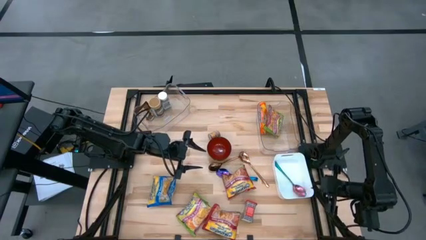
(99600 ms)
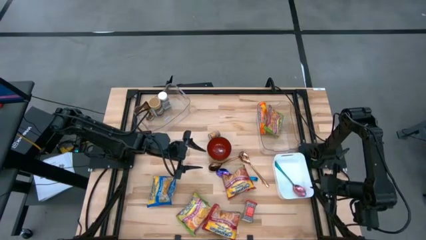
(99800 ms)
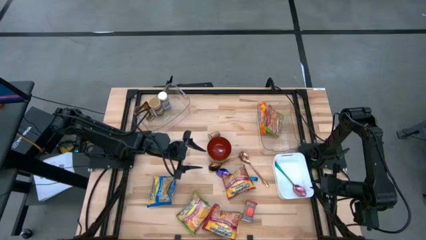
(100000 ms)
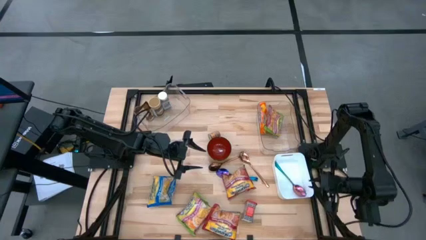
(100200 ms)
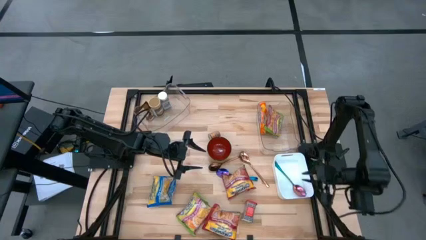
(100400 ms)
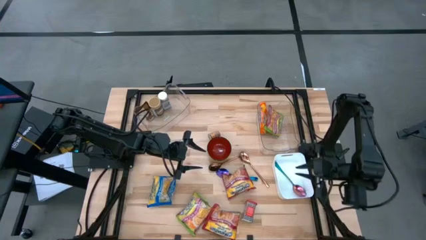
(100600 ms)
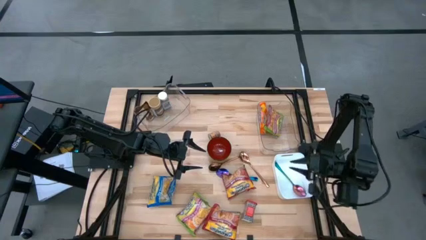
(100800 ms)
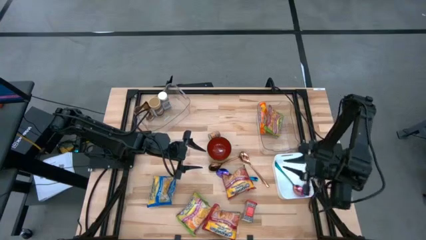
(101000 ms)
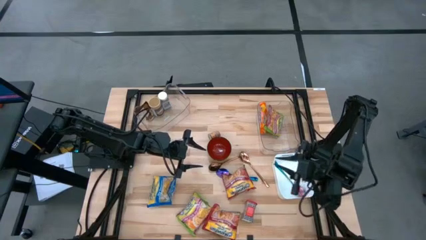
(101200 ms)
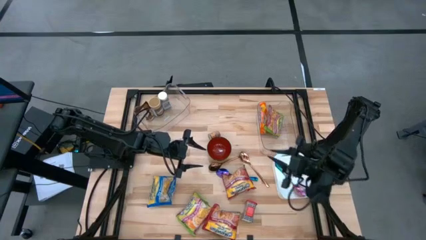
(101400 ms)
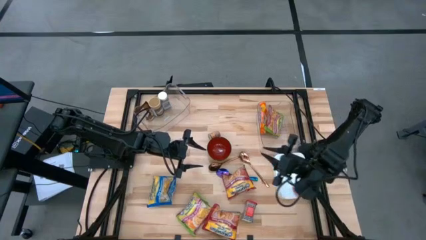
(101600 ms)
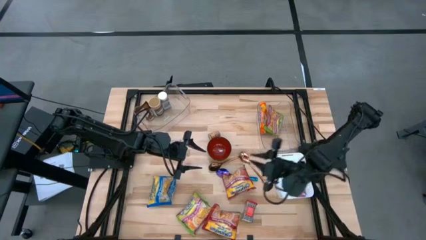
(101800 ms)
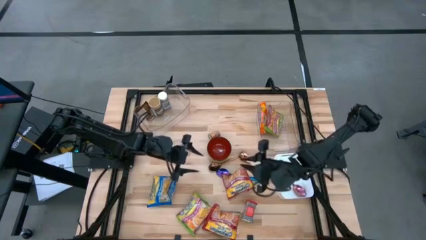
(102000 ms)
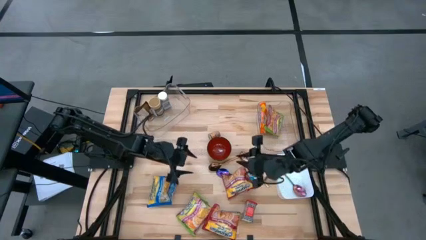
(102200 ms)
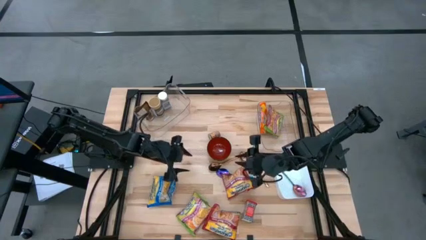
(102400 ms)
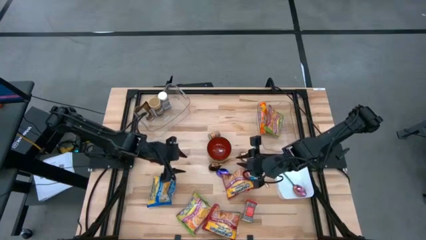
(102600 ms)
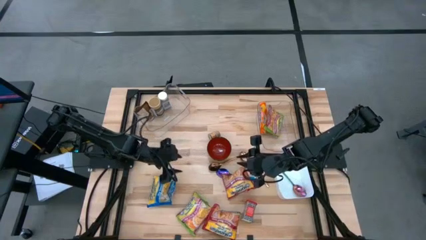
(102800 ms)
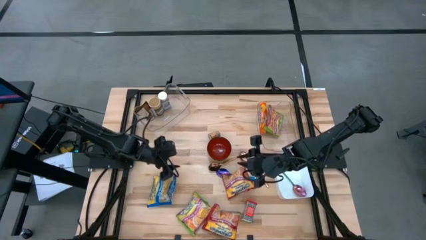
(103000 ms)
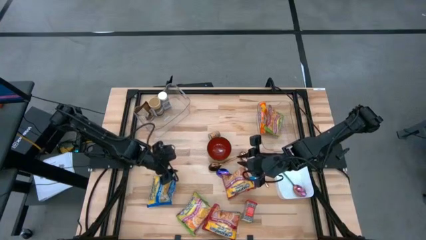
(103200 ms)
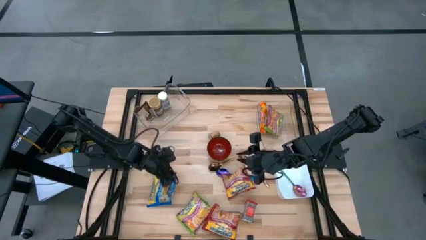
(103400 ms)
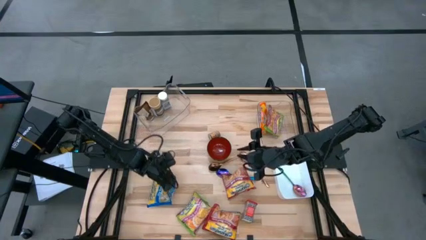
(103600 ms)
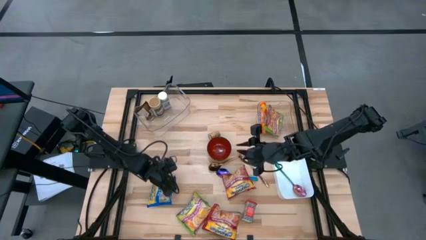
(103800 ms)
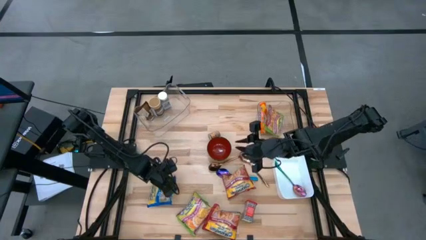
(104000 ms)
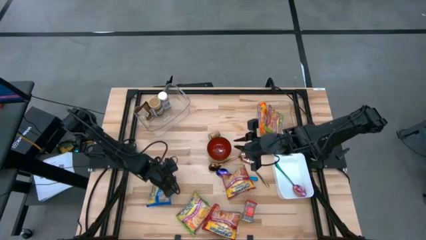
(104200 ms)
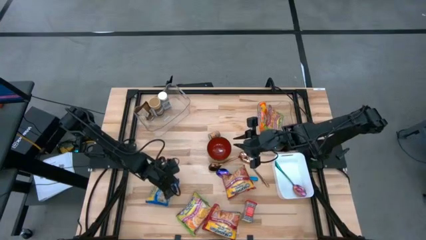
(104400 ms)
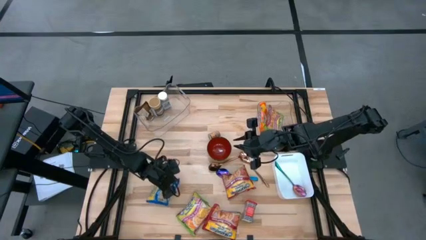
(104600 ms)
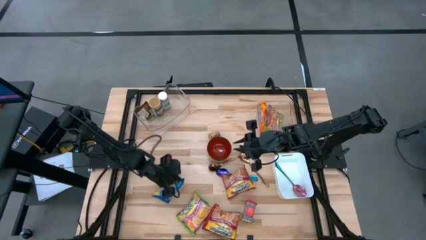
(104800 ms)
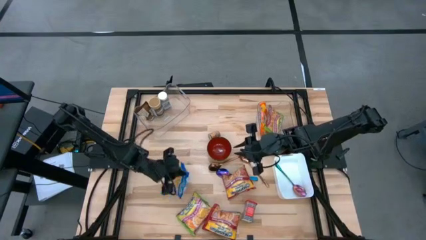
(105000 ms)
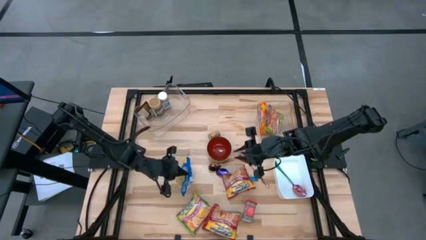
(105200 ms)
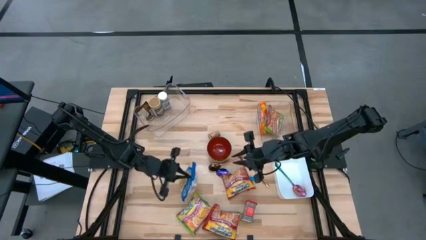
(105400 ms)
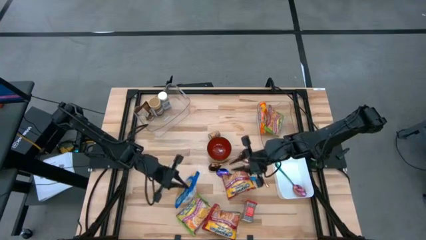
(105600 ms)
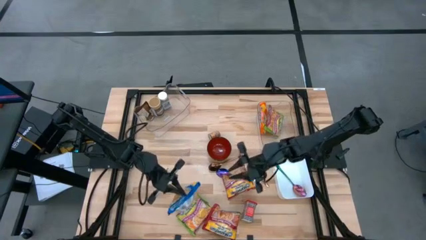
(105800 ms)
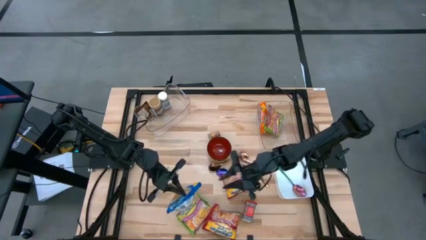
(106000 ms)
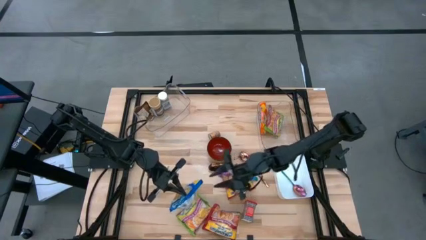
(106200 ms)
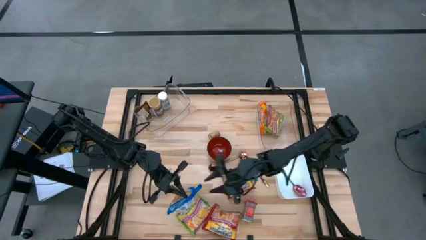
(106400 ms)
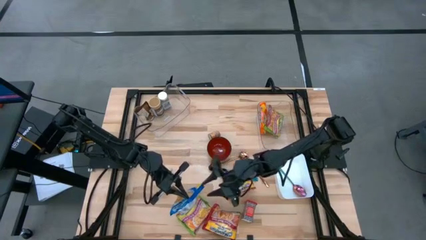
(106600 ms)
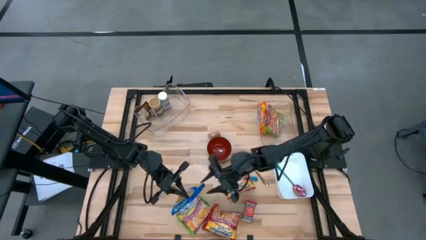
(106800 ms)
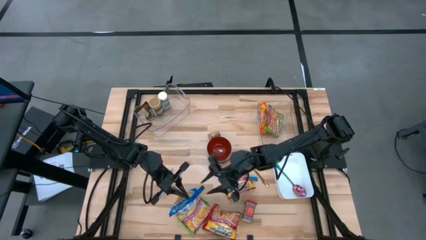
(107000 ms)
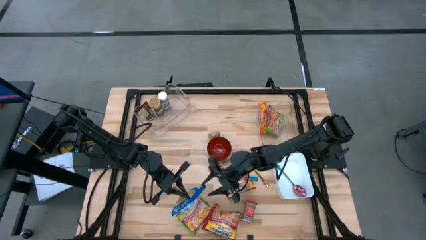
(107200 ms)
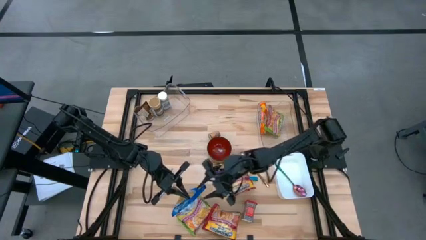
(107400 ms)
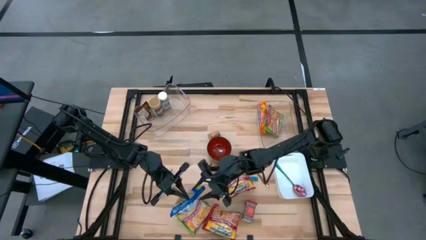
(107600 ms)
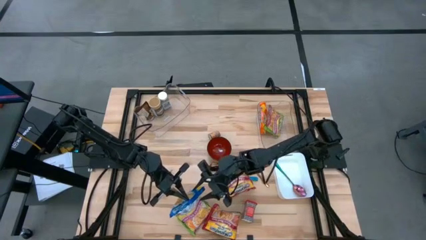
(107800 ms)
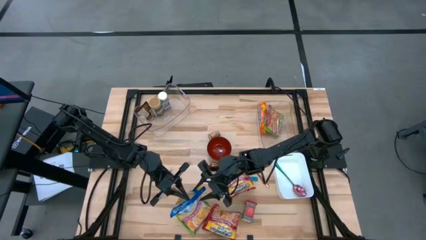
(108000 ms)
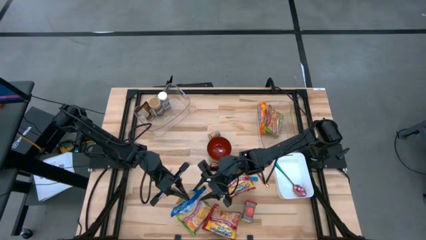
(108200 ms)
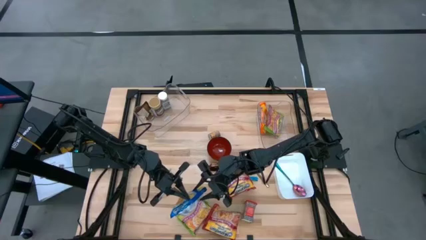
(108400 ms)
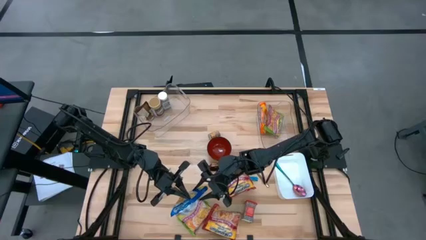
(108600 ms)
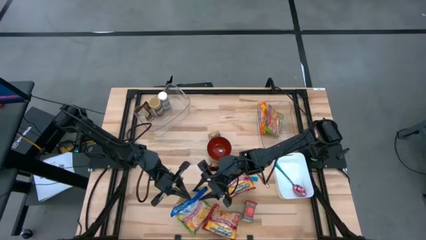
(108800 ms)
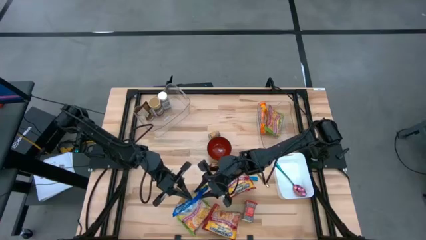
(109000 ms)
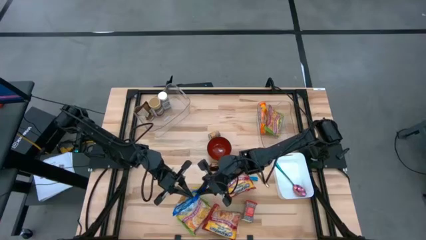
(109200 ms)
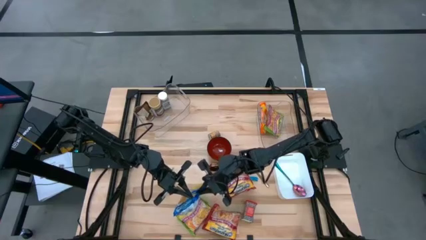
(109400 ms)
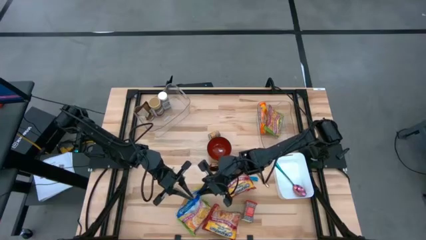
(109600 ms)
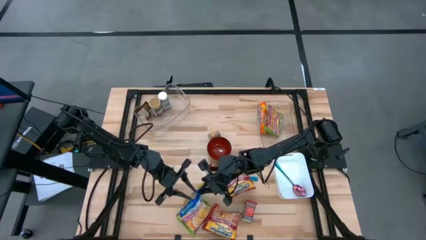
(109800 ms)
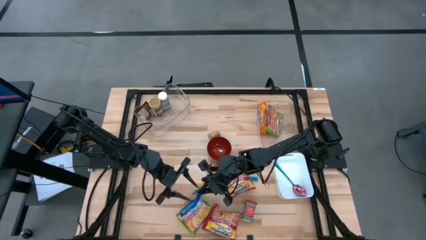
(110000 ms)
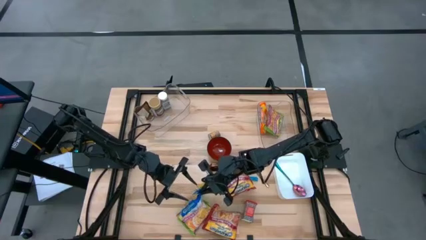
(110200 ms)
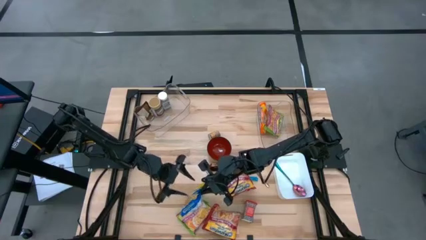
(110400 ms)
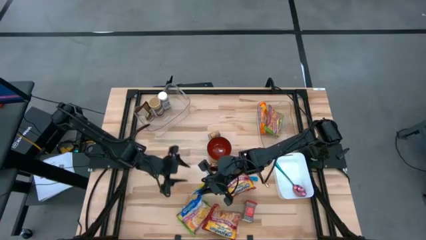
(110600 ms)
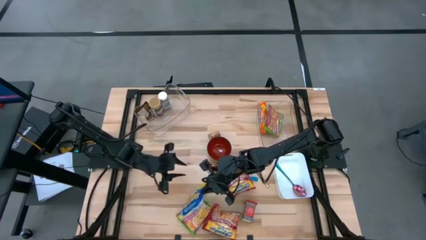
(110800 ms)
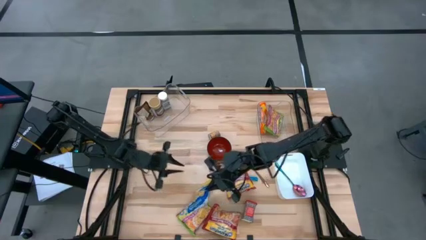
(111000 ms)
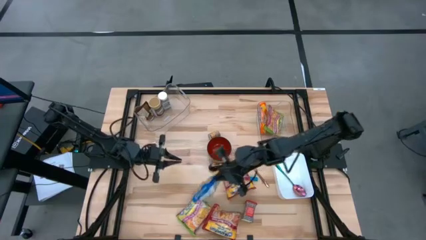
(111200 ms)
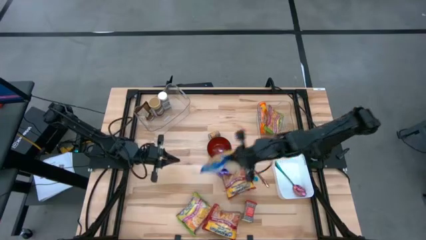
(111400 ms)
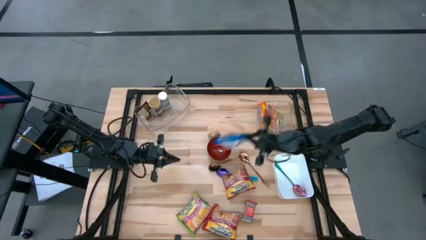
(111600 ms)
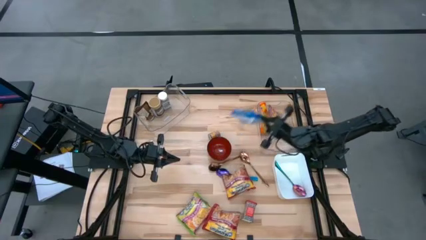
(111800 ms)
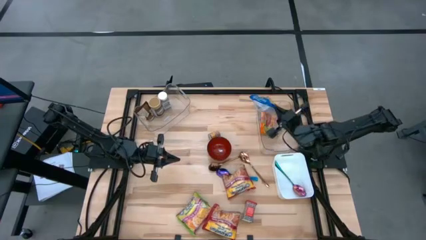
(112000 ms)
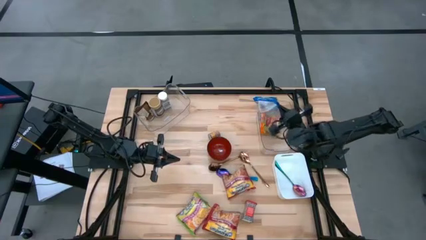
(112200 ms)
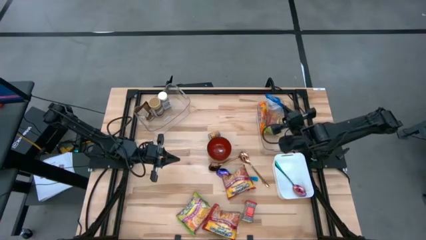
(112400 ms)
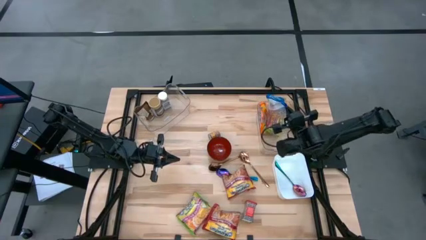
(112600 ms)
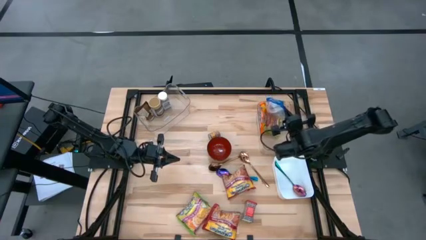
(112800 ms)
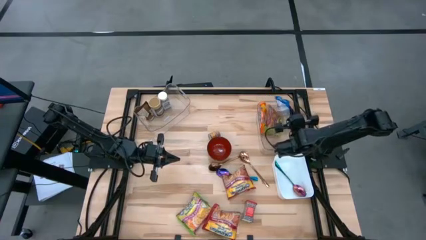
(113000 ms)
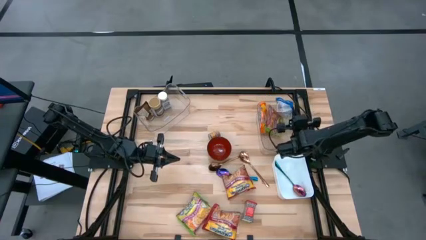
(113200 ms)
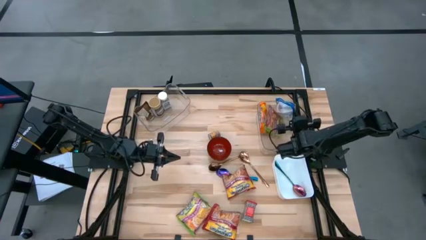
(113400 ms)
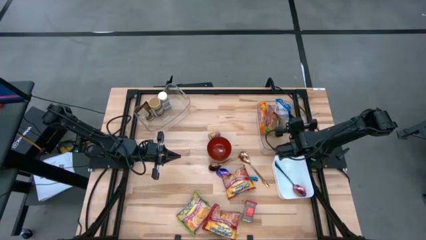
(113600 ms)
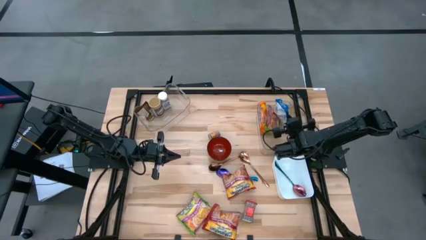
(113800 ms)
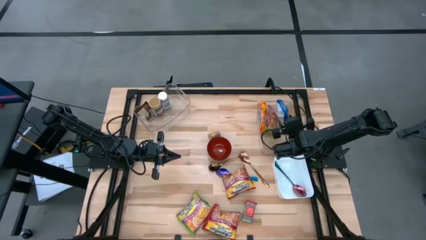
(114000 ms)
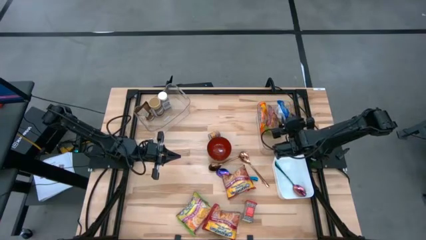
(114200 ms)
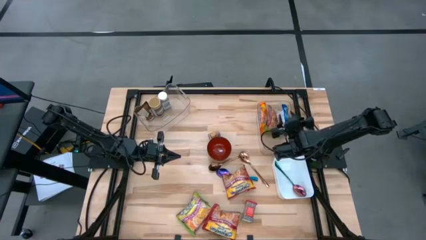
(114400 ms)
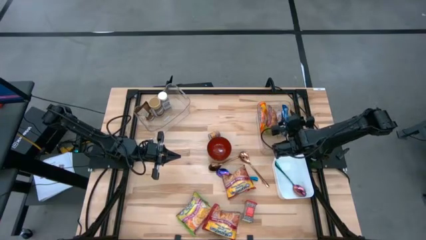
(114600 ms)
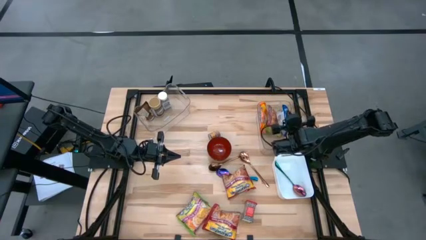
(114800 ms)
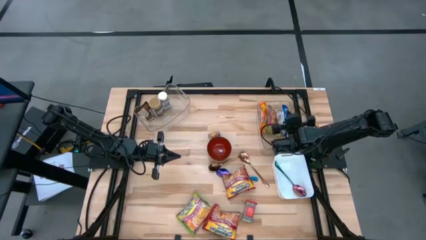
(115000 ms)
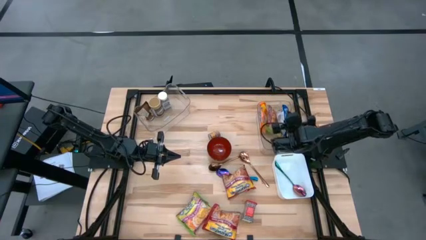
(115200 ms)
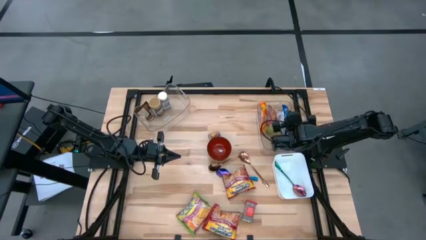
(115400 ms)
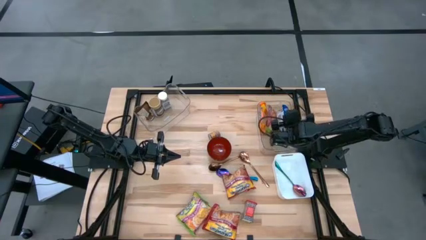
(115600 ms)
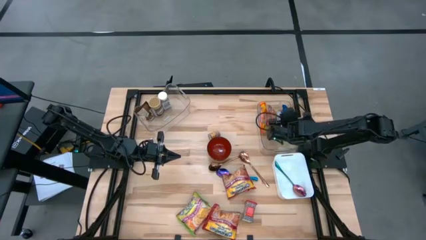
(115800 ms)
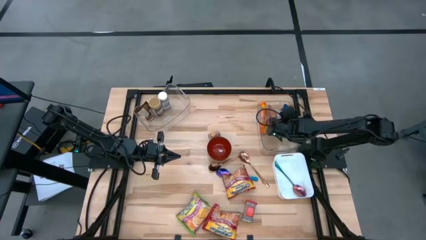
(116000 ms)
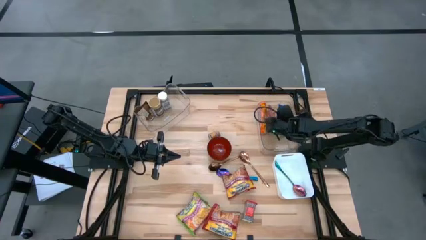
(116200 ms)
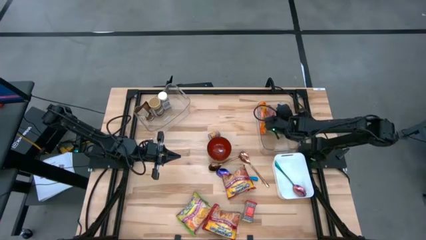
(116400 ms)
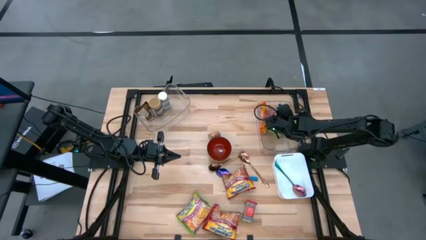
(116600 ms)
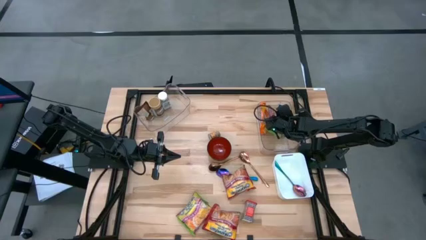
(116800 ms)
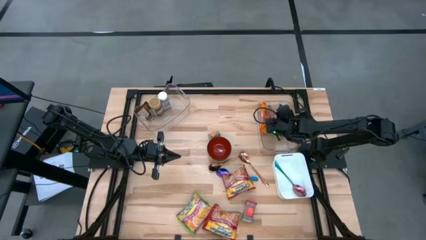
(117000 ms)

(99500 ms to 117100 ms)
Task: Pick & Place Food Item
Put the blue noodle pack into the right transparent bin
